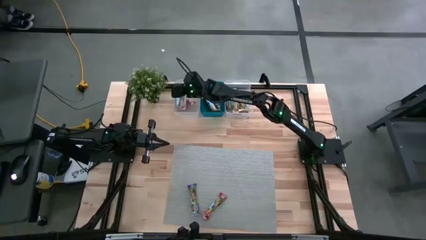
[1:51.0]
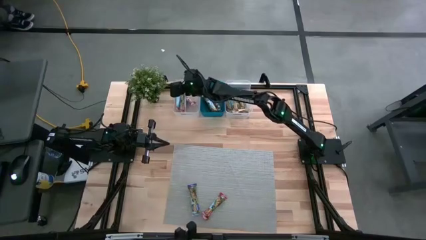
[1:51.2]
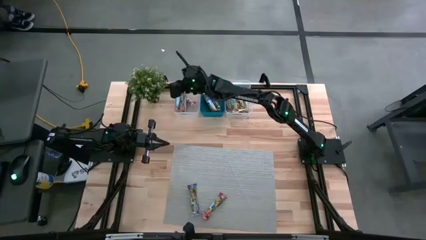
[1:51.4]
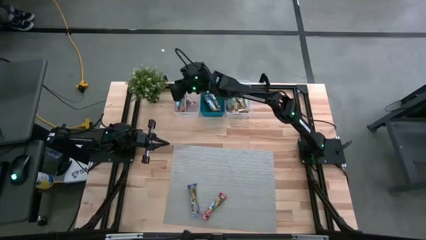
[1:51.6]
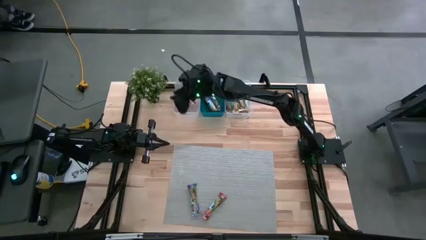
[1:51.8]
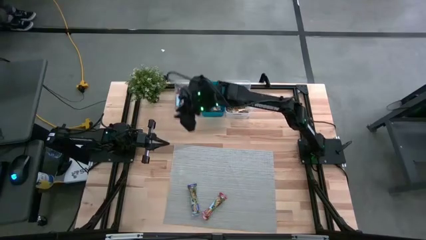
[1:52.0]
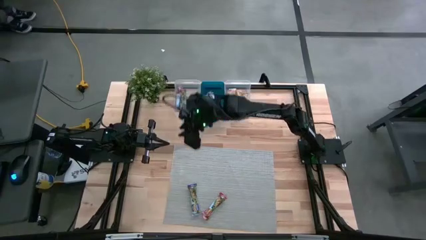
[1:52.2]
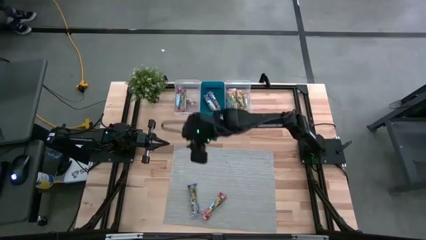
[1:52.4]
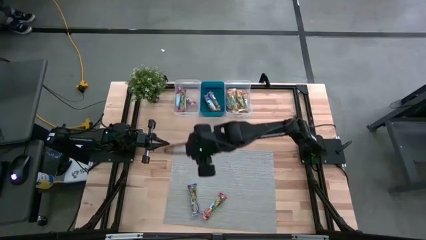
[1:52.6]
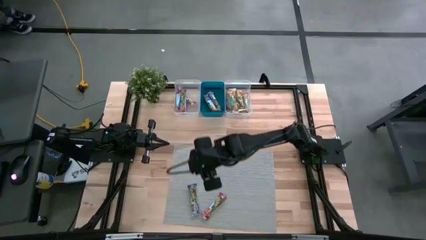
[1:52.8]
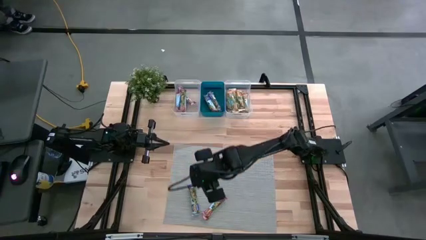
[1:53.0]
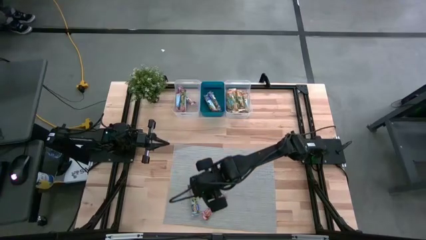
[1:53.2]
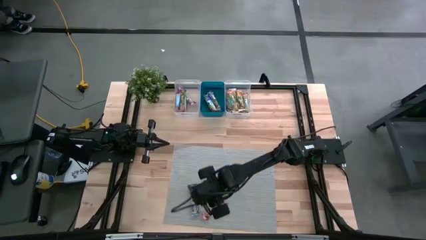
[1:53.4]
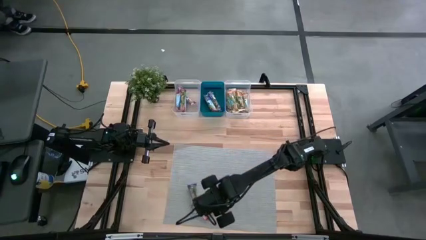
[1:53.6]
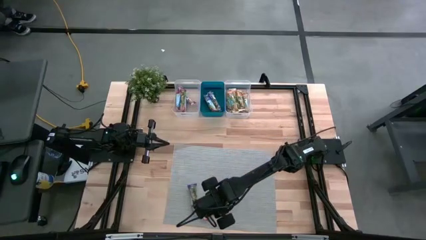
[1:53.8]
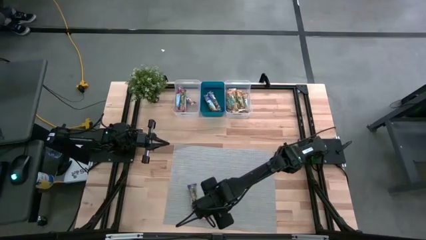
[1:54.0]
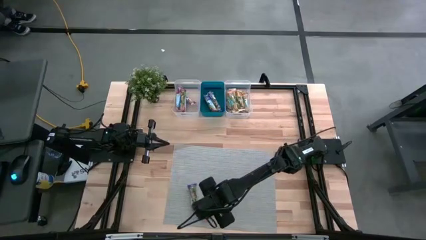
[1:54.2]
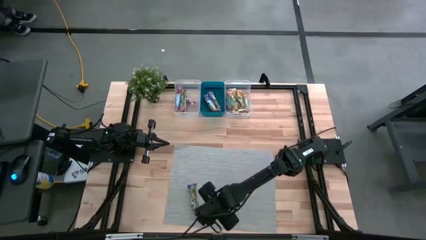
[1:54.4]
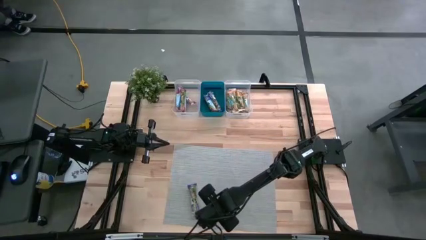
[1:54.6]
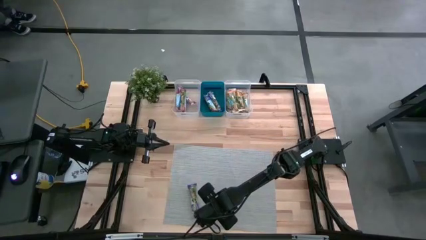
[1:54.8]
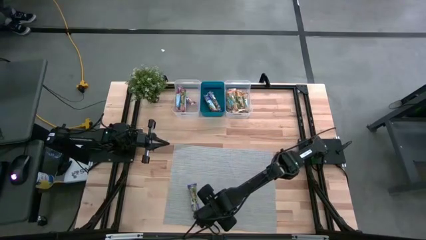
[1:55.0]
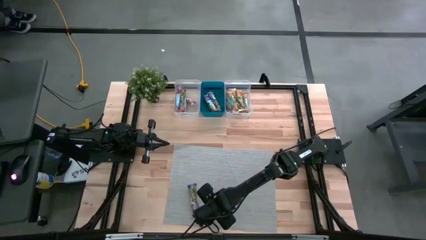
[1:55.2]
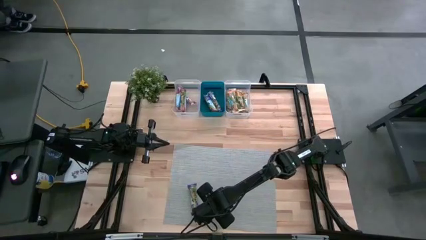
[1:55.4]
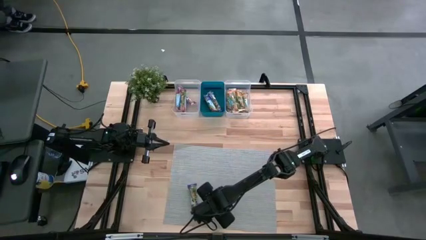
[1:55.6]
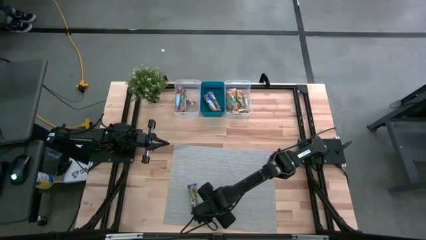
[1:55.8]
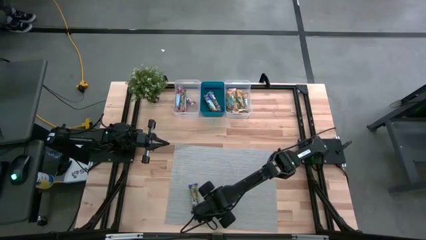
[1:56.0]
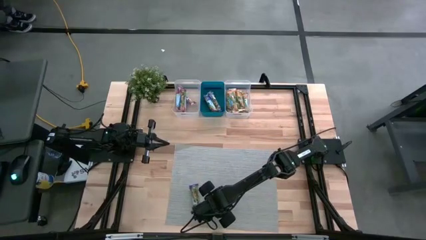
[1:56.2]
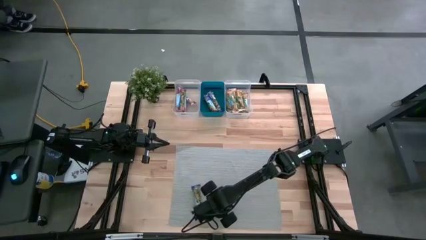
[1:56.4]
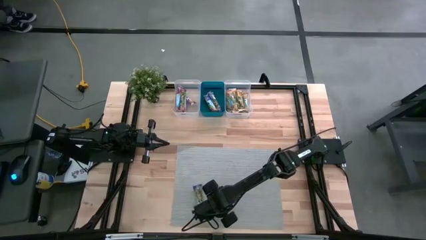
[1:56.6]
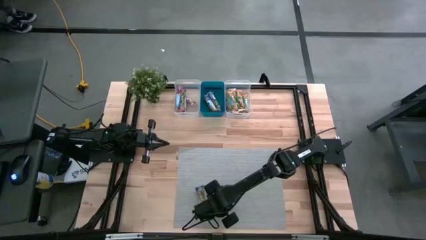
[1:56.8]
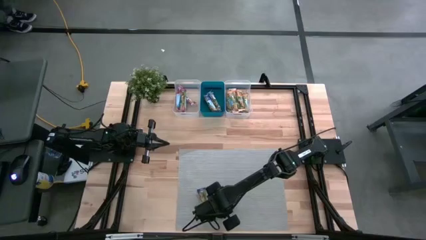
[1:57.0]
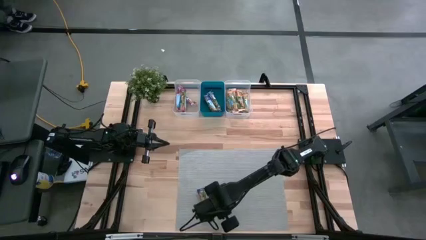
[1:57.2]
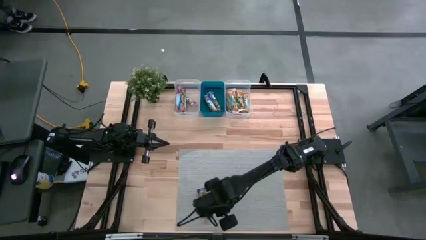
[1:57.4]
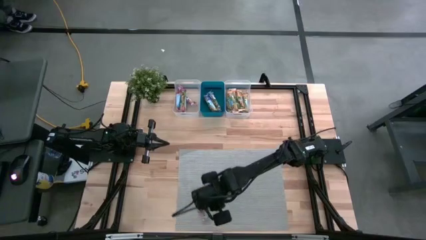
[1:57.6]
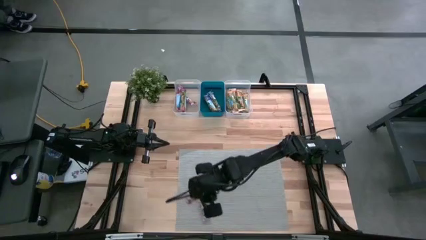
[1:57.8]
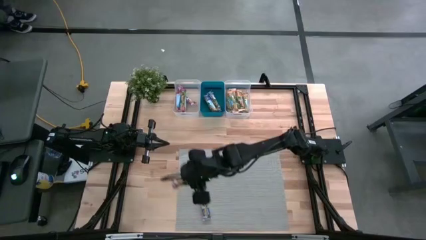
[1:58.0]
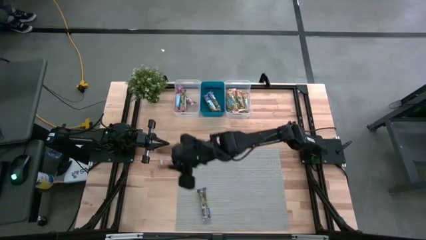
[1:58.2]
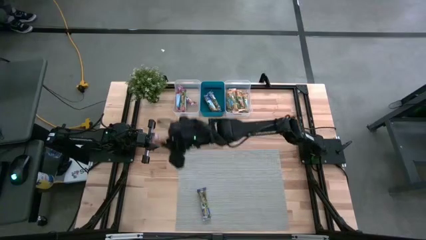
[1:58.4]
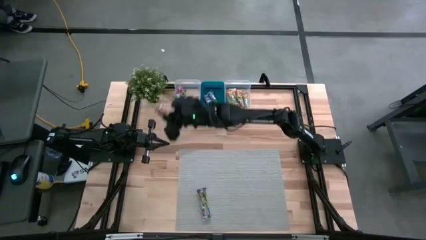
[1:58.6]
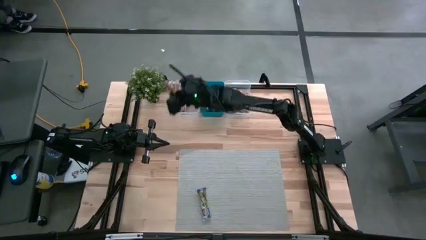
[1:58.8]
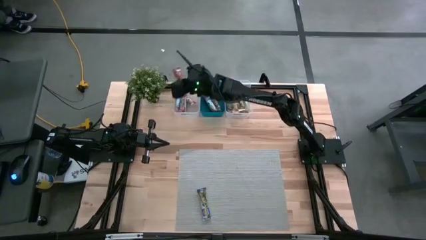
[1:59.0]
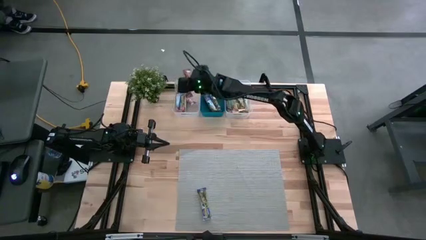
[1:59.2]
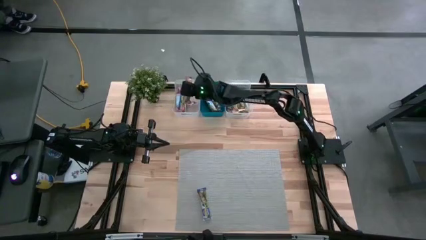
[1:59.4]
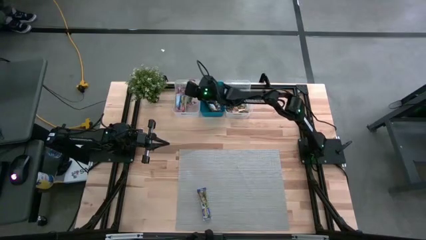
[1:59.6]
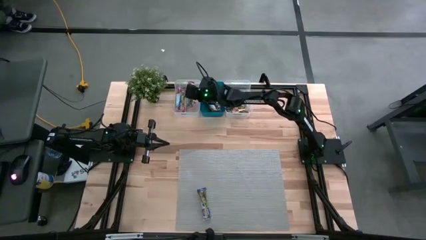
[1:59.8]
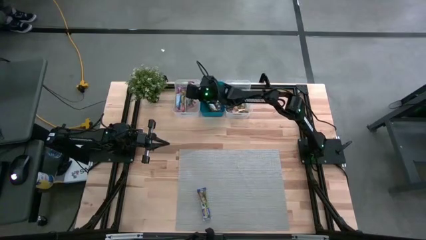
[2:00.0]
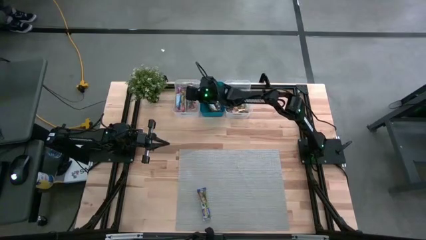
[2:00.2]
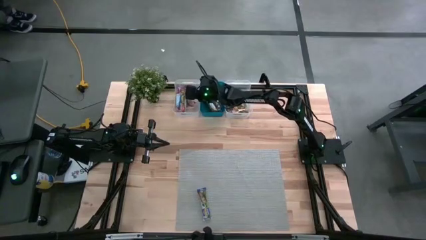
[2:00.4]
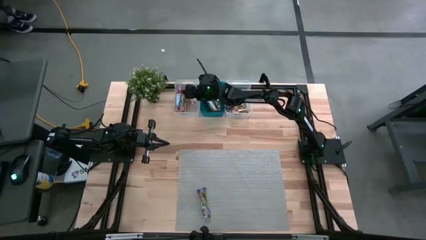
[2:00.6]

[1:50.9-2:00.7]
Task: Pick and place Granola Bars by type
Put the red granola bar into the left transparent bin

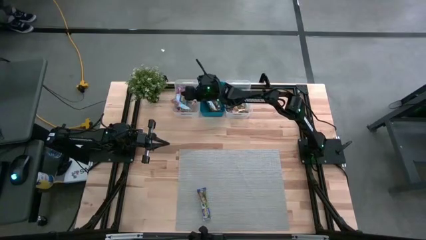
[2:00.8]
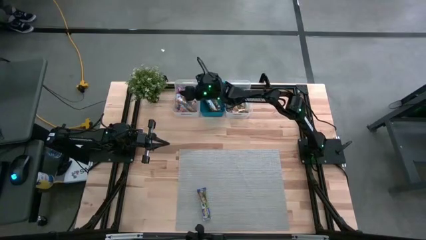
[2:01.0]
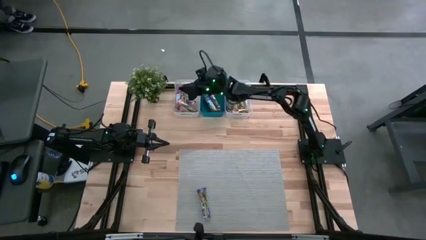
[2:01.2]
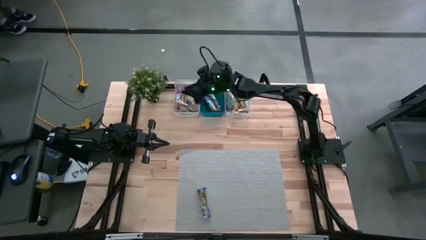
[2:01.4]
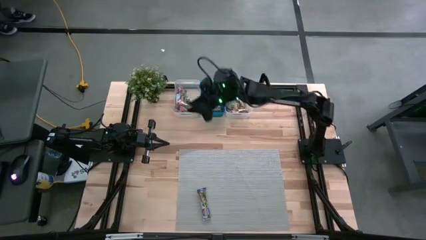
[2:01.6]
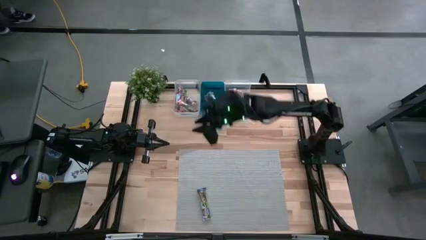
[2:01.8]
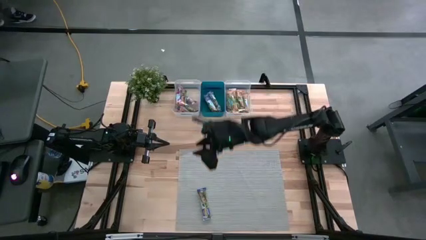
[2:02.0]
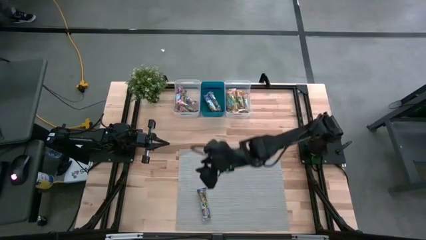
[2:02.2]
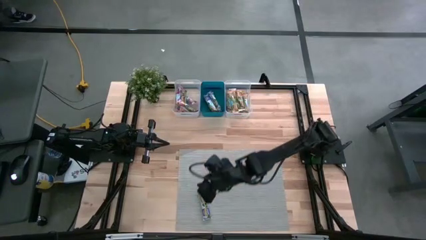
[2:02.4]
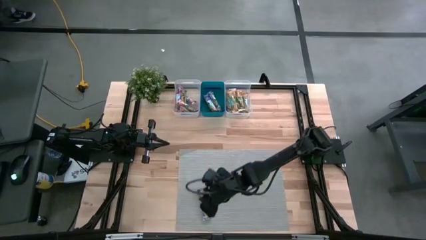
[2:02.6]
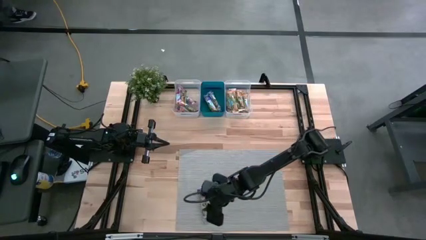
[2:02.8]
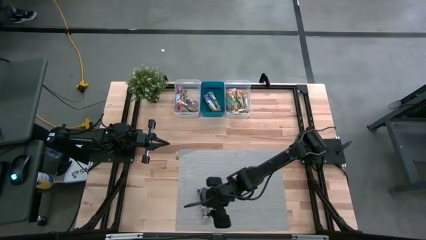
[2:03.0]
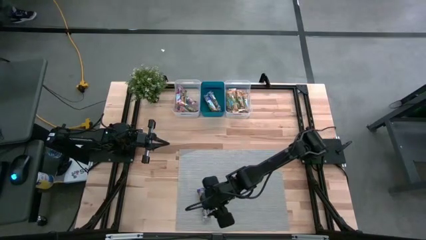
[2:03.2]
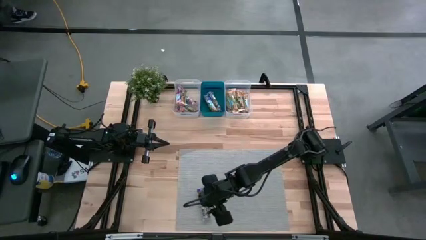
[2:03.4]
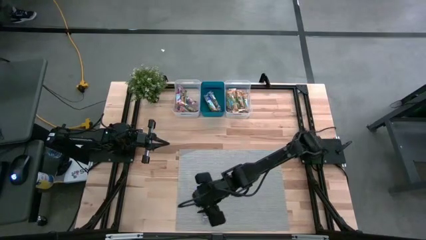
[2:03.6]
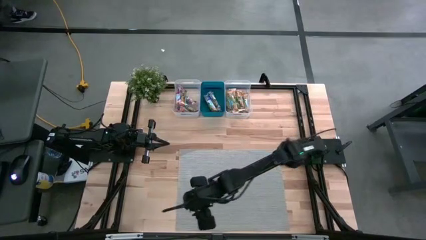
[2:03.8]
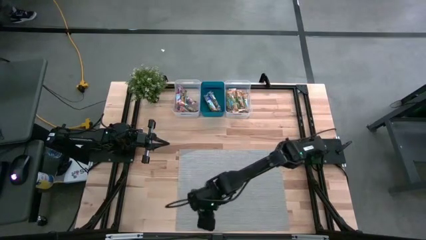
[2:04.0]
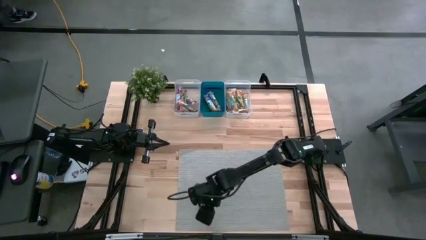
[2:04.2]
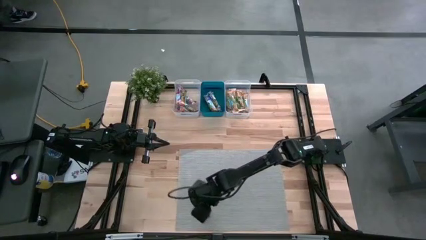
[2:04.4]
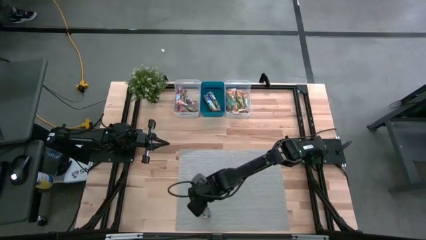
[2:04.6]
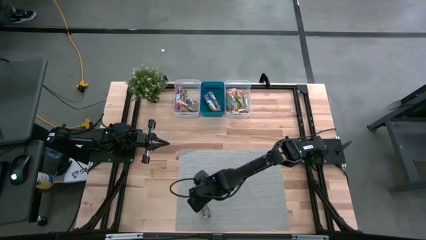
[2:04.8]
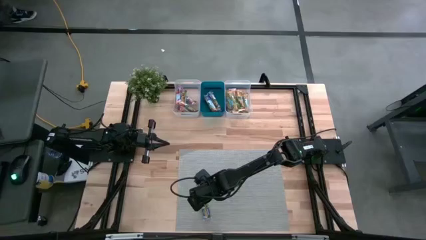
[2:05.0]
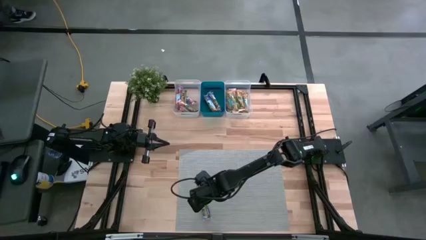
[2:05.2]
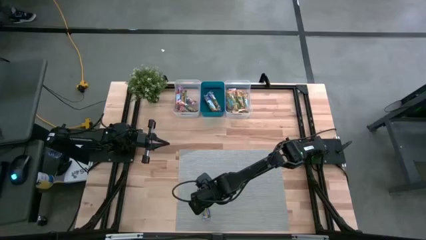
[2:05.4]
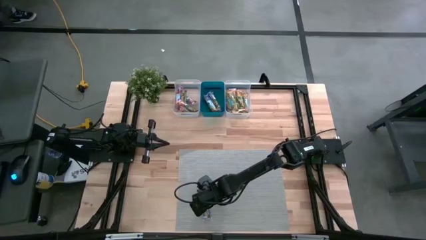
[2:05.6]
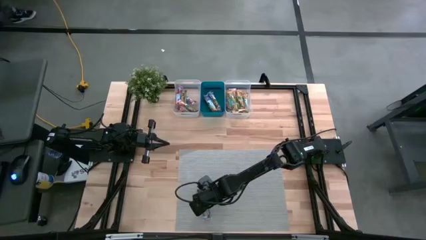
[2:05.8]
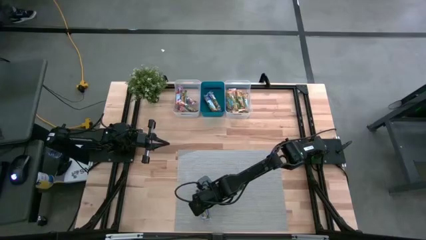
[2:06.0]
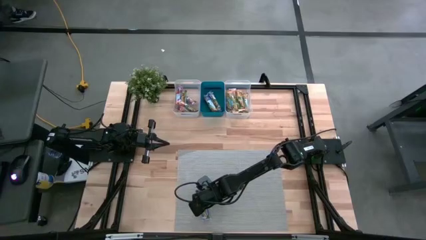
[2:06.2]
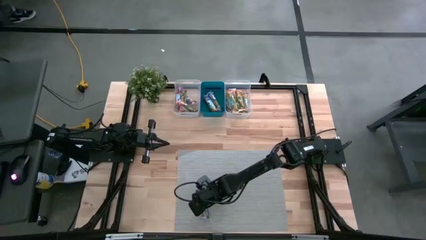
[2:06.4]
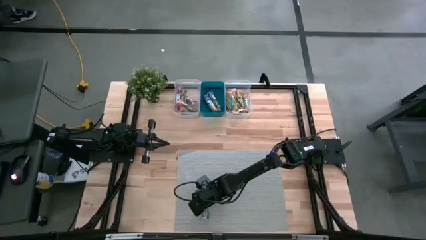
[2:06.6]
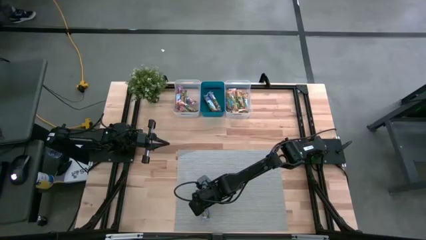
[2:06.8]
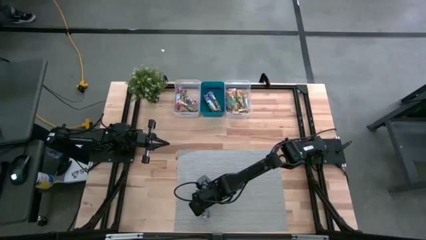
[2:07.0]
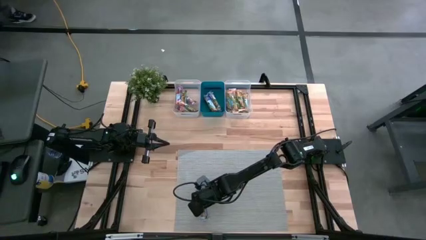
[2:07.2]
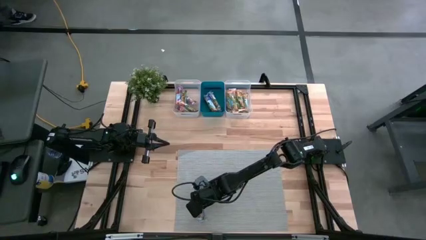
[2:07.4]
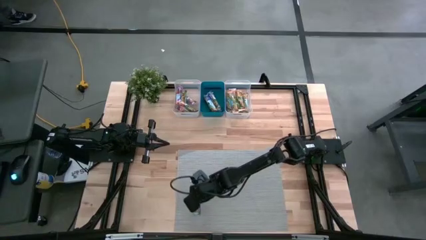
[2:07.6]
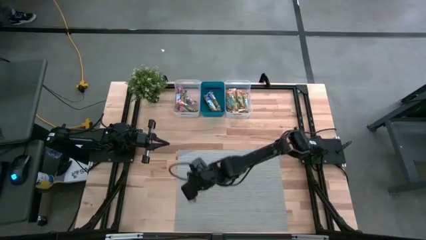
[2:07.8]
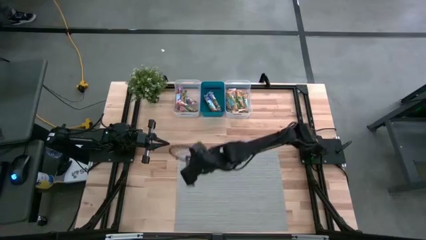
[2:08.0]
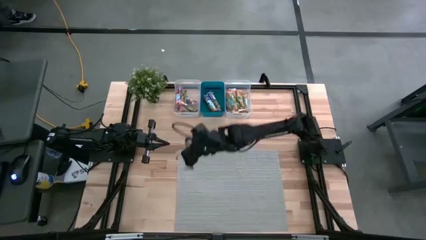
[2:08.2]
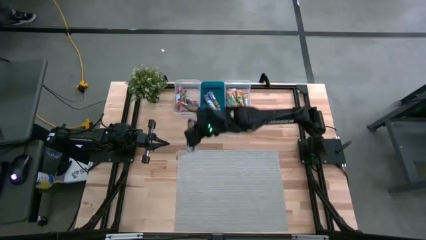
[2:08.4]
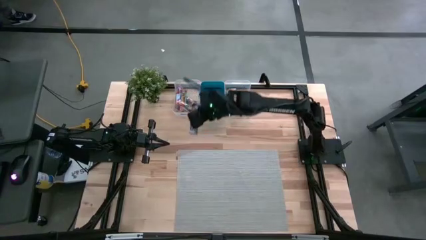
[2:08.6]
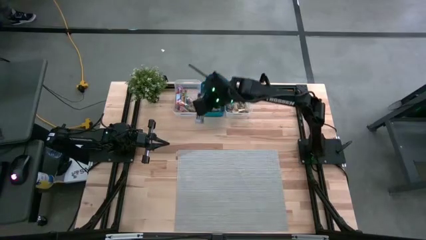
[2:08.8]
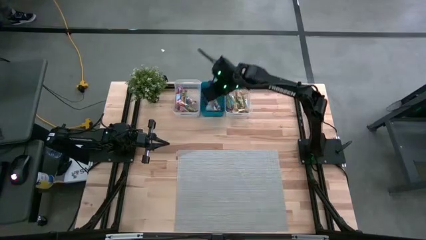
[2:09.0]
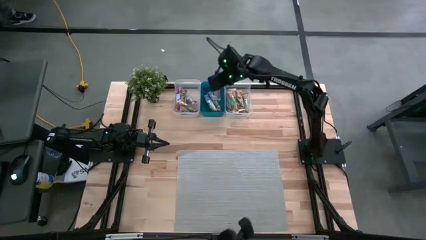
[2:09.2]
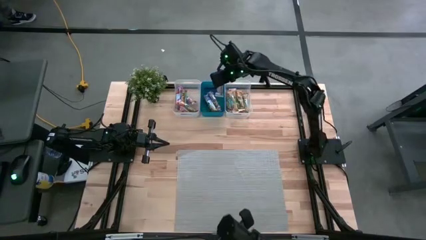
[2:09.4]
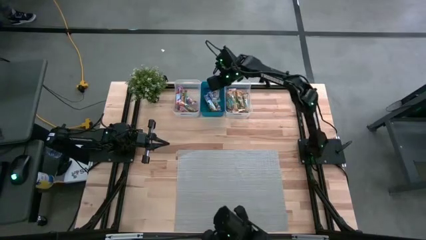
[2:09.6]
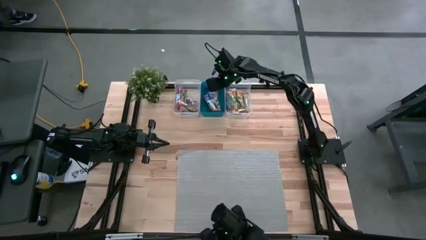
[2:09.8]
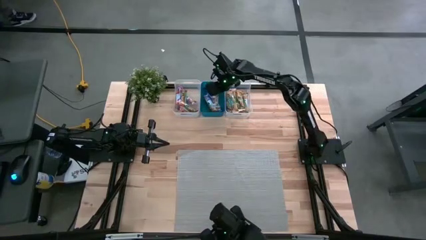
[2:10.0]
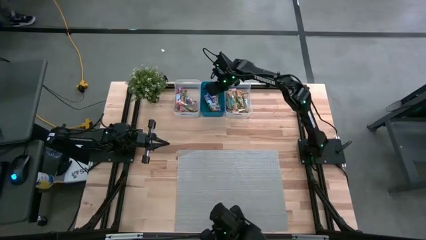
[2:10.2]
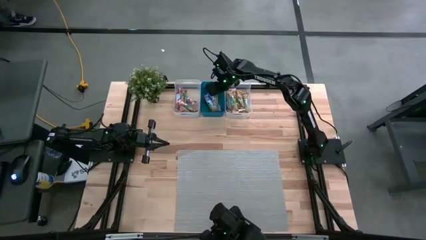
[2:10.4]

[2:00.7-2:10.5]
Put the blue granola bar into the blue bin
